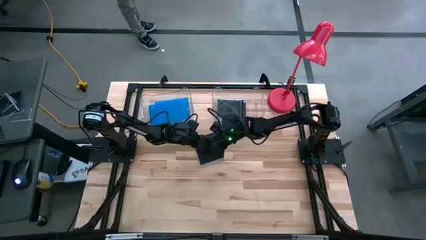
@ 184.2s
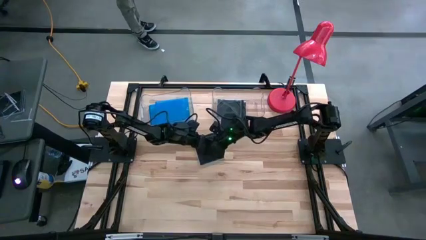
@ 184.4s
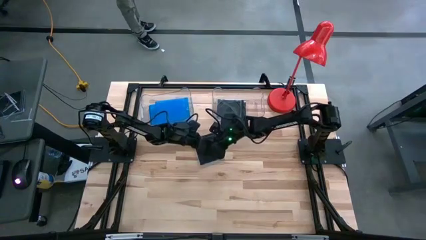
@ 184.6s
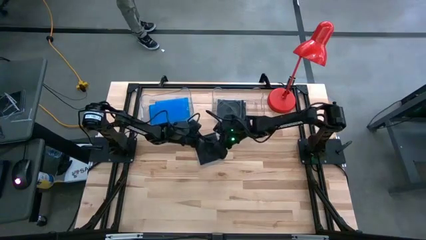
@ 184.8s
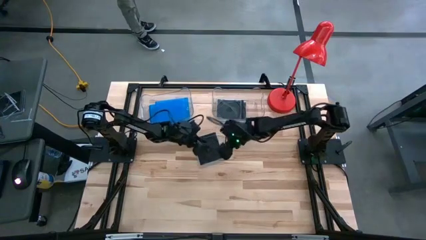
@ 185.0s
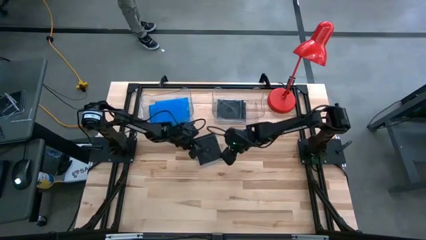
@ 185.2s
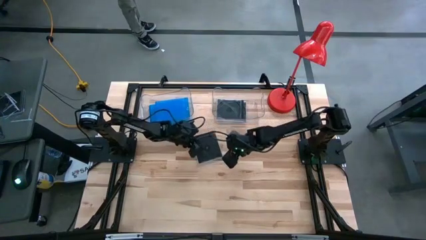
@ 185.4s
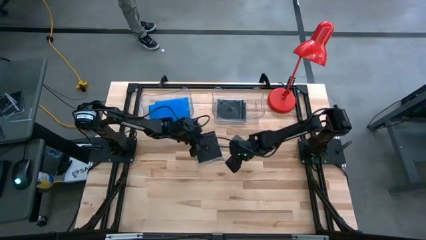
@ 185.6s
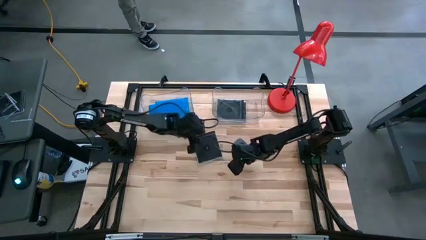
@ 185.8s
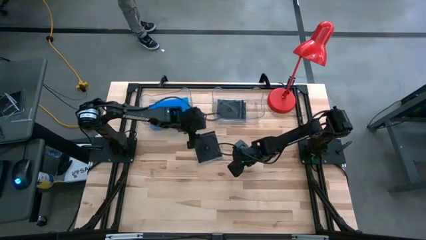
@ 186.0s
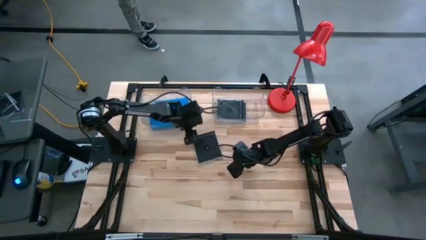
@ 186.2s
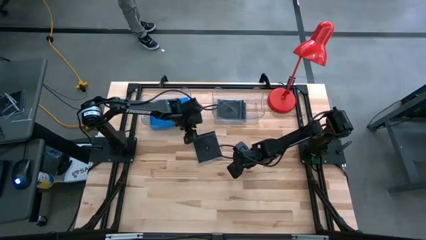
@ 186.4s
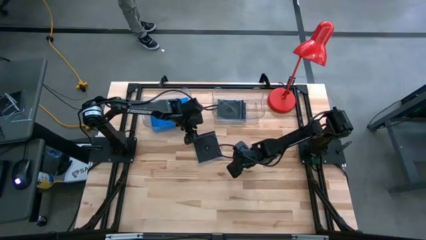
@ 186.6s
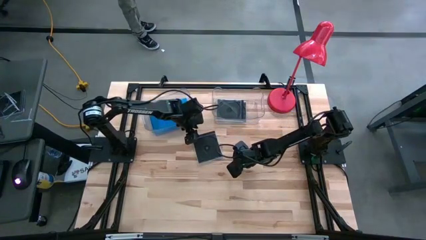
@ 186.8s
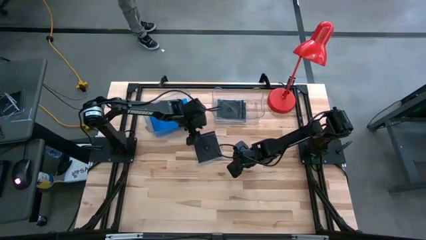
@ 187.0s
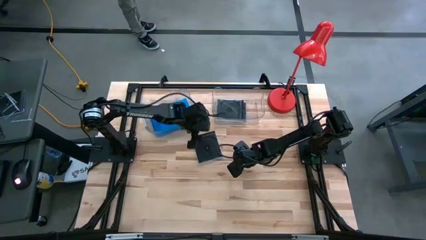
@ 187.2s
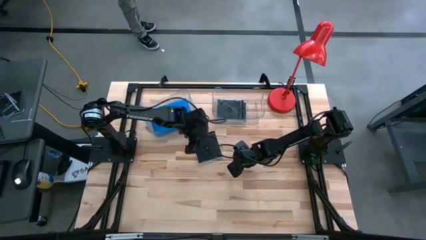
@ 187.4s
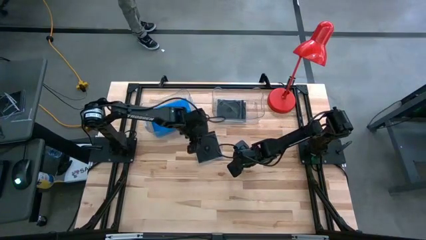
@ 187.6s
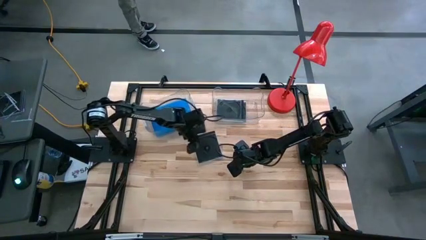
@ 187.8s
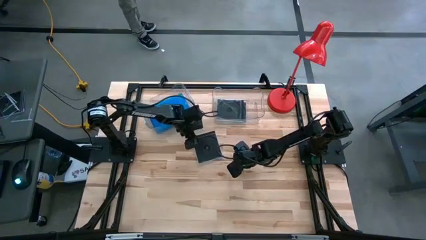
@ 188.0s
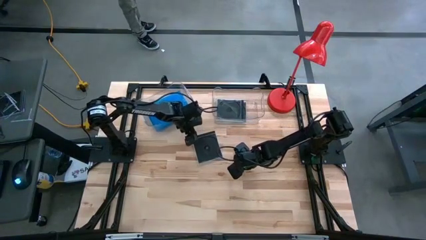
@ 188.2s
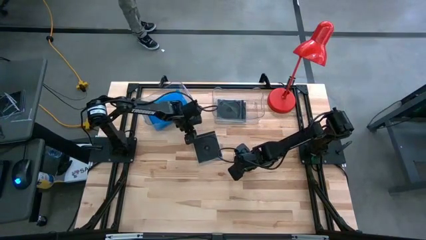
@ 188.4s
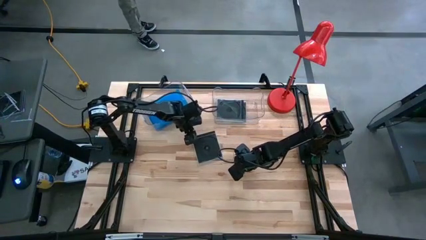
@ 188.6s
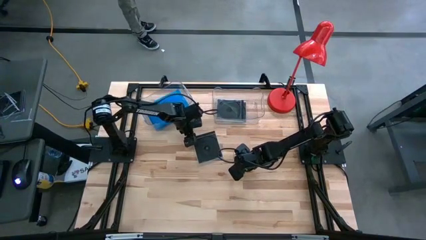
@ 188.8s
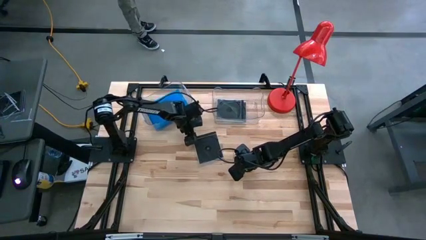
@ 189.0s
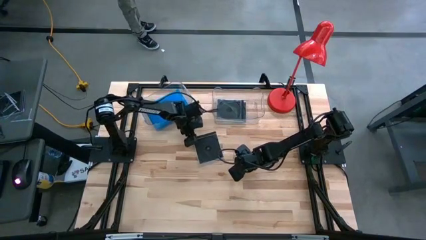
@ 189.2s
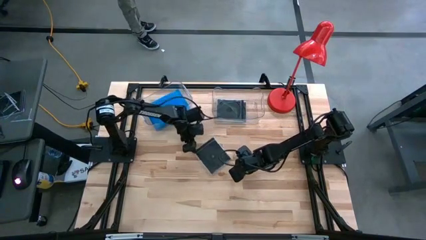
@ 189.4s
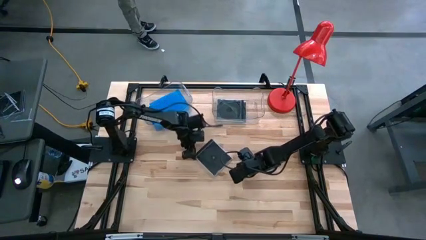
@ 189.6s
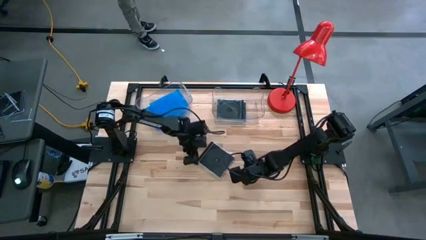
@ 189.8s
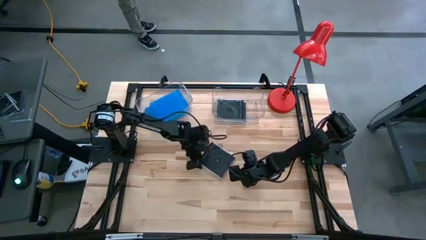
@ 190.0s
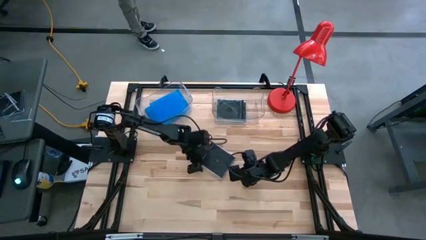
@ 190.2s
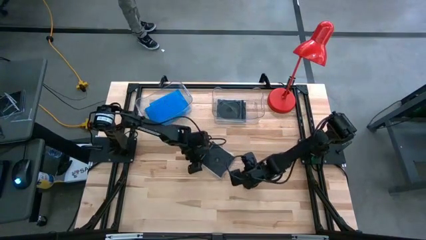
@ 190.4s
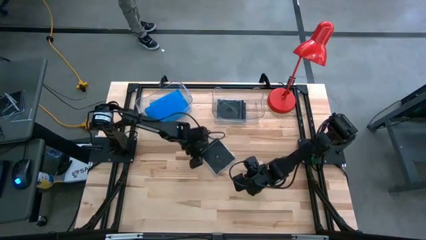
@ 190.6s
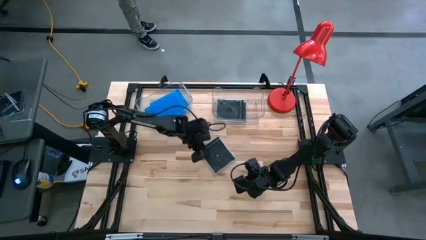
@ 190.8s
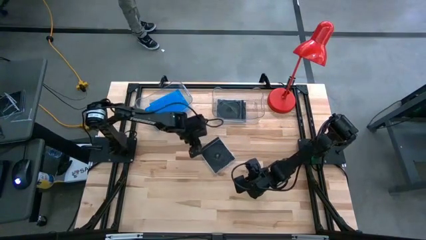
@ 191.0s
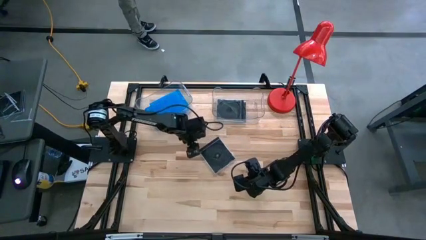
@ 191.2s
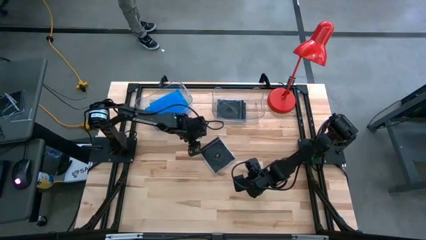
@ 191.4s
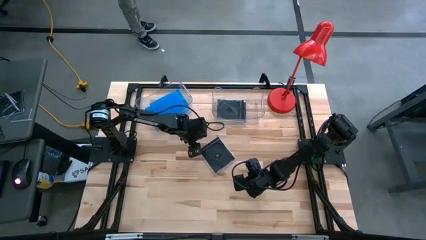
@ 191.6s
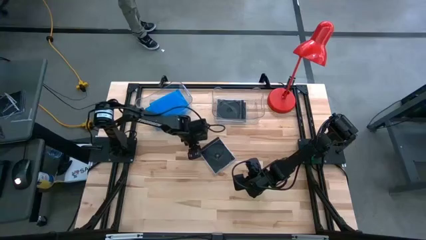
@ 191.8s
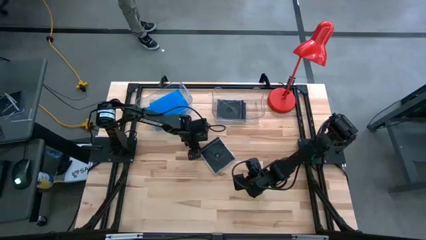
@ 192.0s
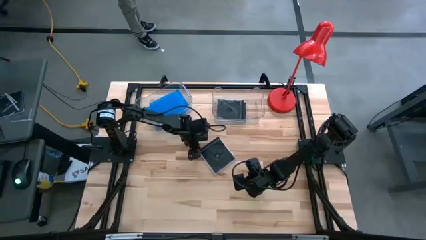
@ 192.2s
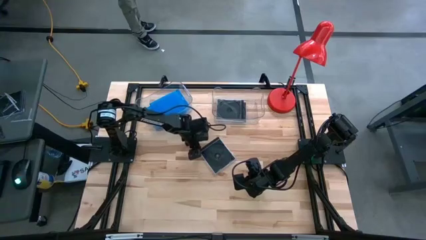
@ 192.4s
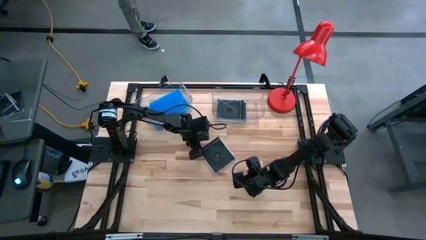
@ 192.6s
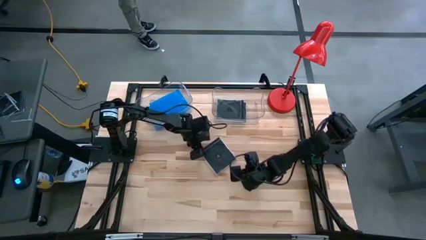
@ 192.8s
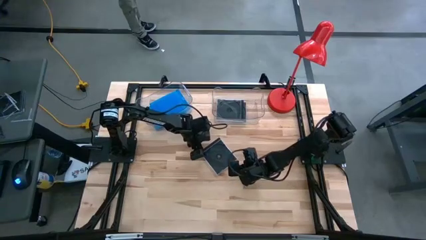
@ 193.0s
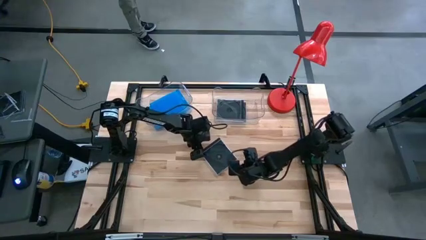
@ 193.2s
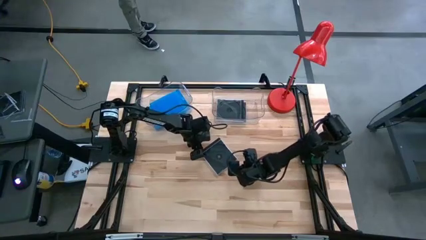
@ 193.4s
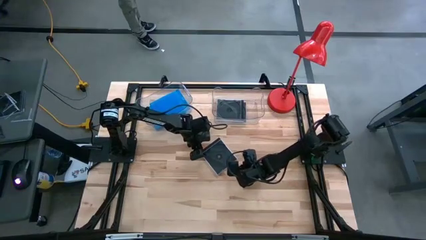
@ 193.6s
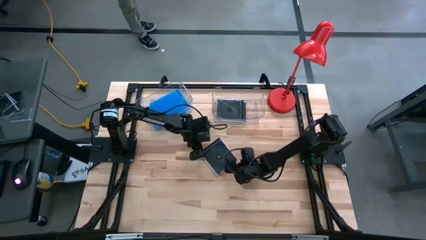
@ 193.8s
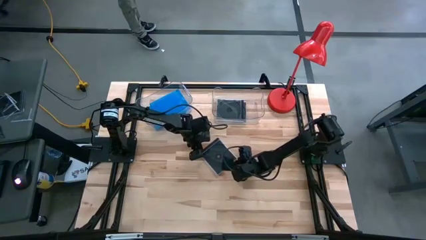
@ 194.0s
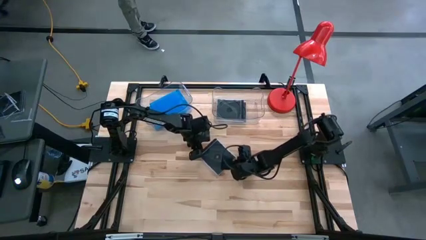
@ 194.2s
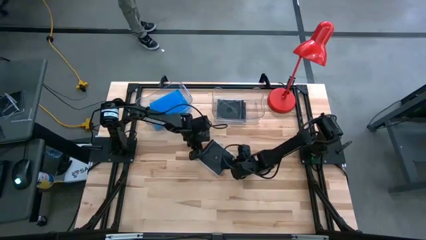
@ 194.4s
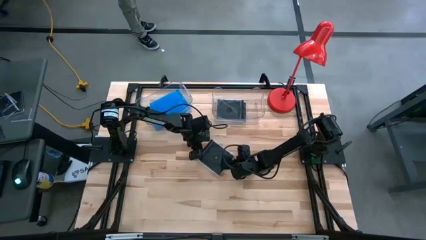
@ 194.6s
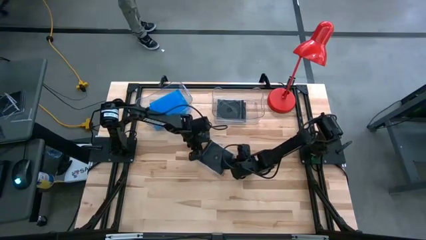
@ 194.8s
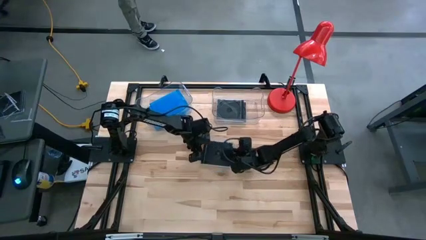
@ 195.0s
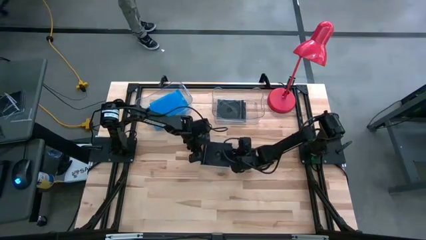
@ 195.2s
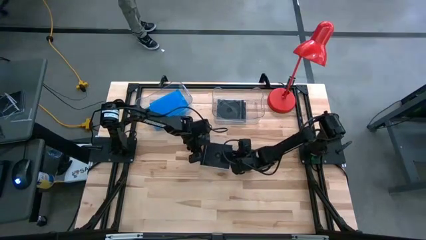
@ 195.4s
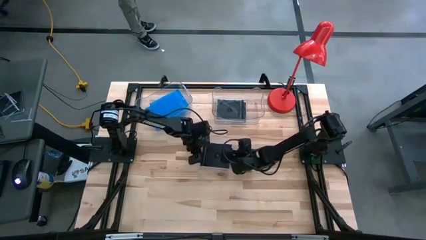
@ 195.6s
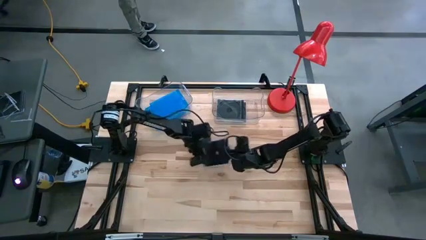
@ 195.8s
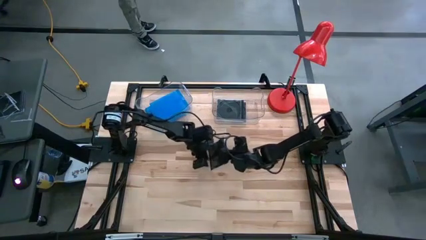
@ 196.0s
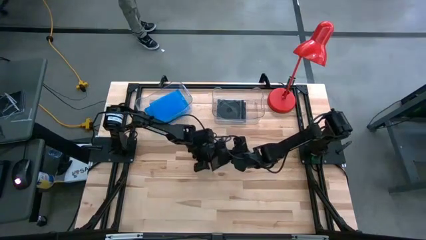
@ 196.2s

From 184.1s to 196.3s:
Task: Pick & place jewel cases by type
Put the black CD case into the right transparent bin

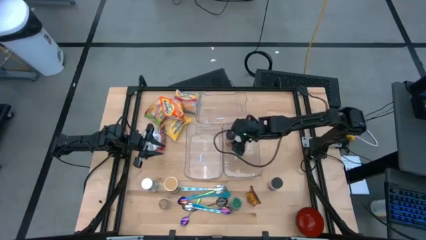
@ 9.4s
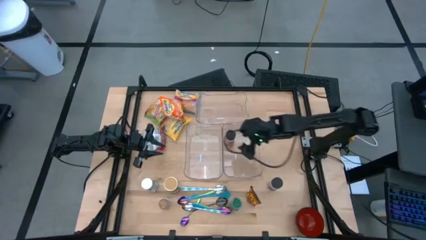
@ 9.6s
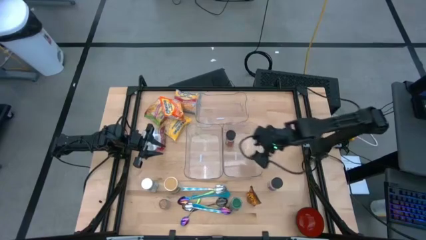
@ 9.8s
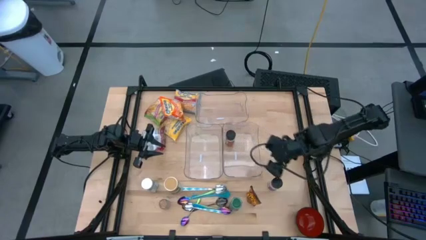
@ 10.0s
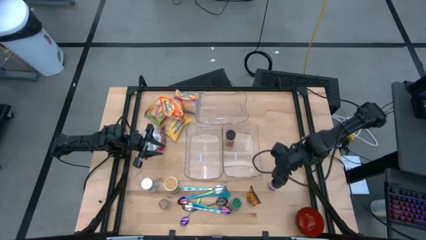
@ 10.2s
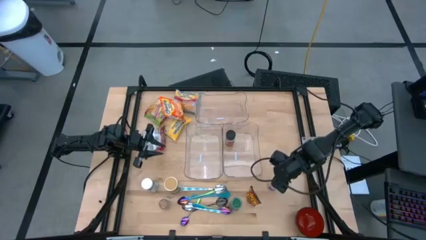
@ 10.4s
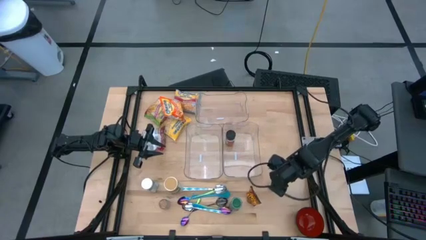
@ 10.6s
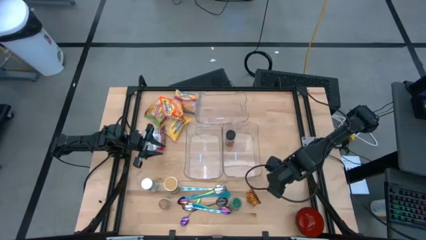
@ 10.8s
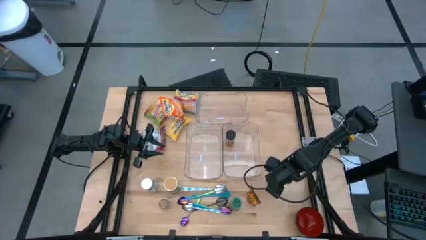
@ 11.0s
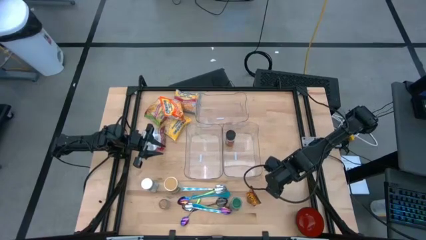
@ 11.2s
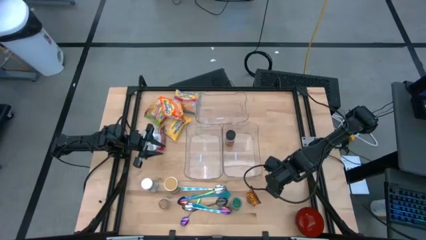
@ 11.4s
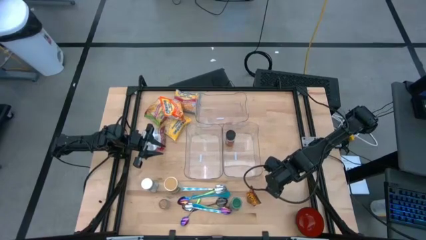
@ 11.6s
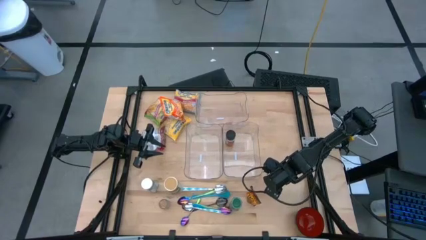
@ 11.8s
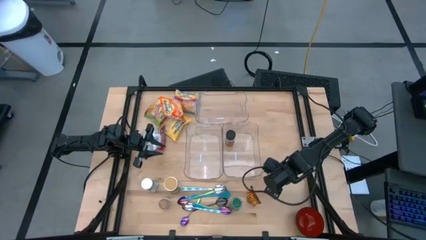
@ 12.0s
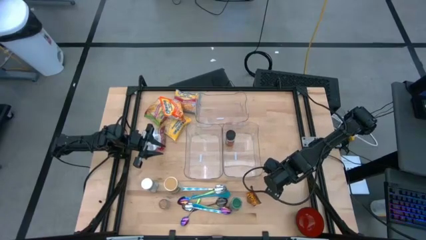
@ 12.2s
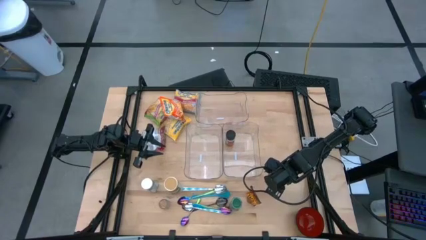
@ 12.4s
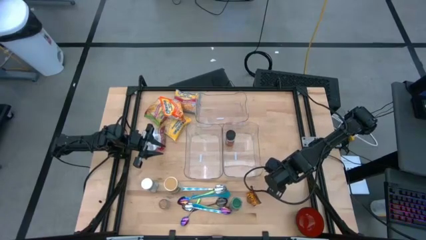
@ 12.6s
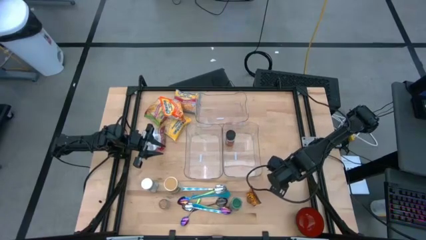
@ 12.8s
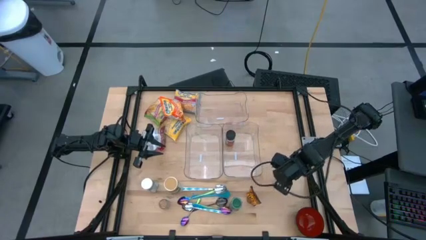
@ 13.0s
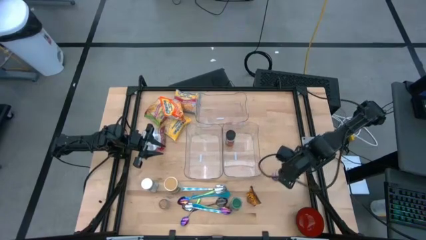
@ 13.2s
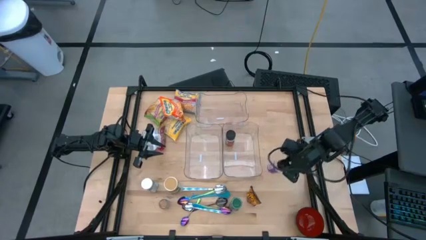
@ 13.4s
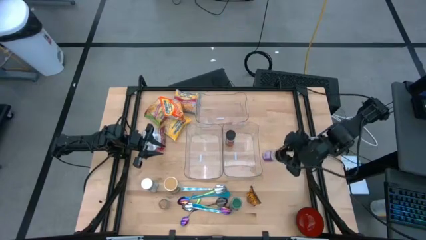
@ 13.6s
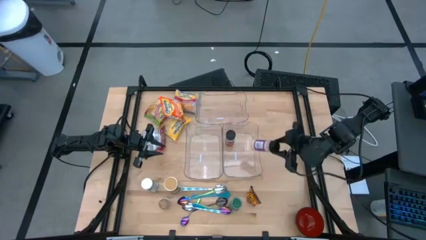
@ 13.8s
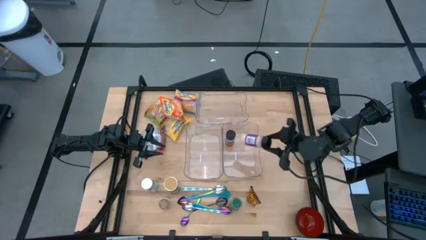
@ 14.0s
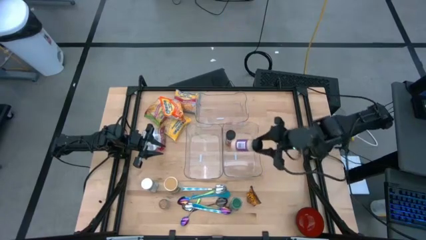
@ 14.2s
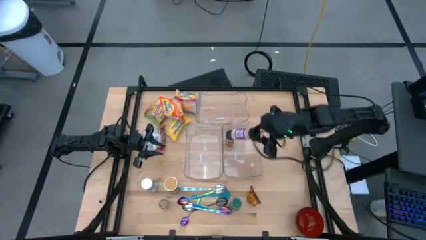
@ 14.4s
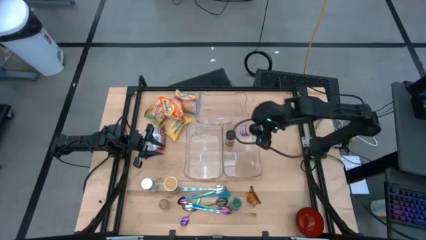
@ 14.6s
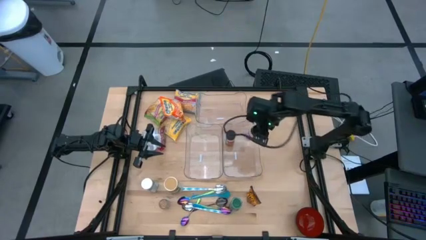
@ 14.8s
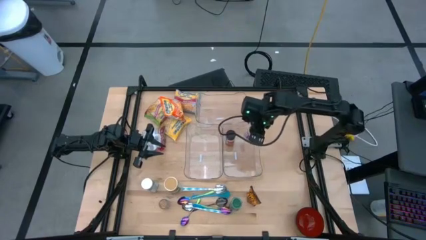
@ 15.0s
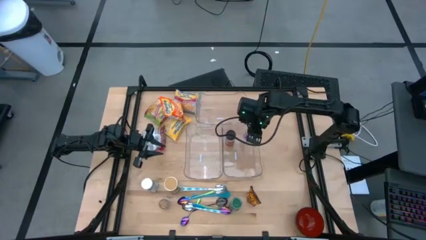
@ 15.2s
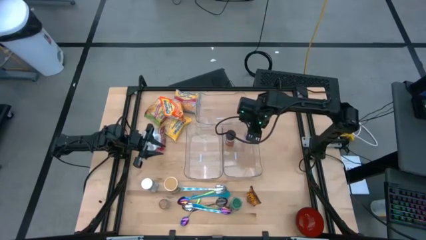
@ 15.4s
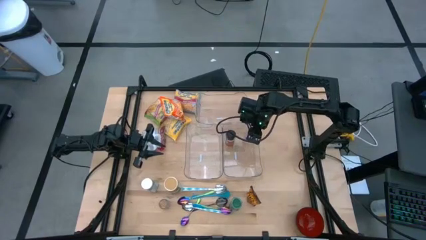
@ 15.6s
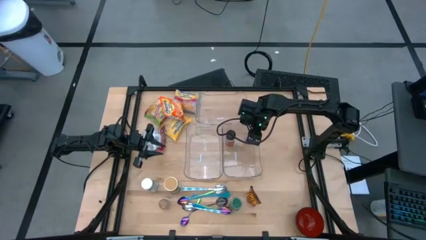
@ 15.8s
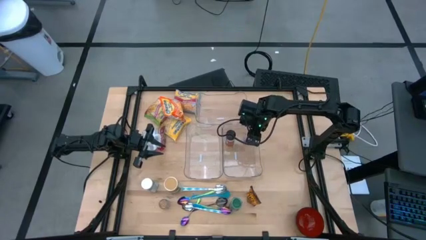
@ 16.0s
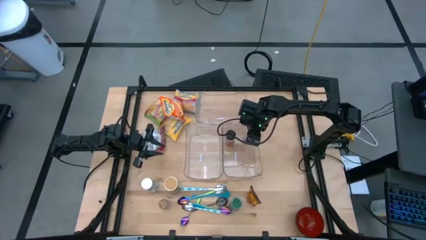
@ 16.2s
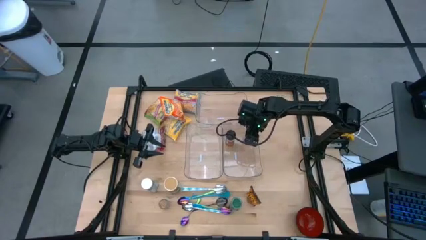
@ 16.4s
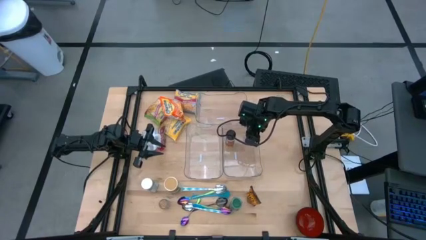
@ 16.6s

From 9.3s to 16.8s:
Task: Pick & Place Food Item
Put the violet seasoning bottle into the bottom right transparent bin
